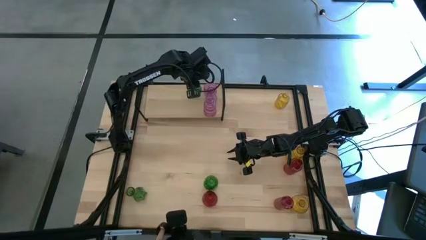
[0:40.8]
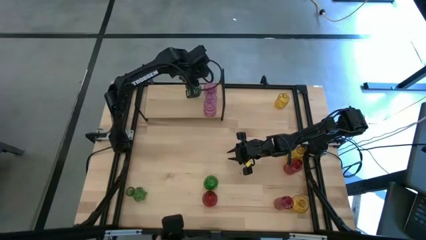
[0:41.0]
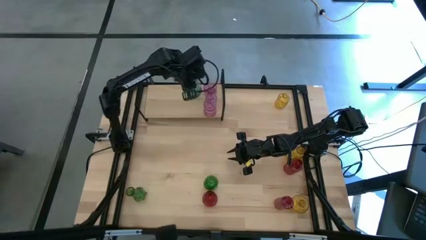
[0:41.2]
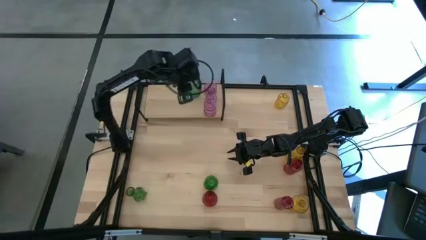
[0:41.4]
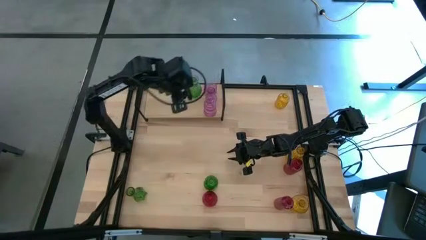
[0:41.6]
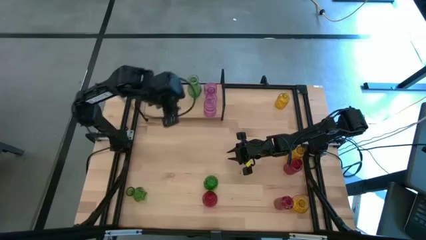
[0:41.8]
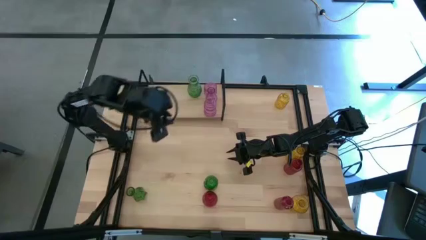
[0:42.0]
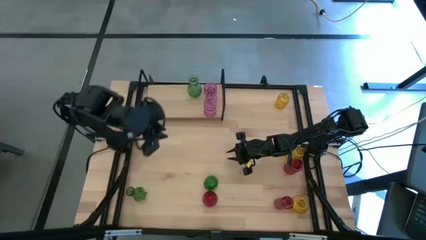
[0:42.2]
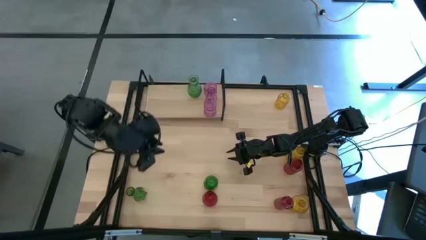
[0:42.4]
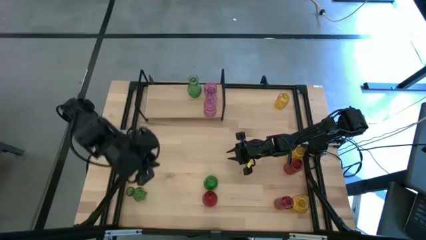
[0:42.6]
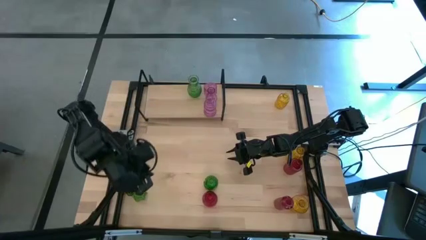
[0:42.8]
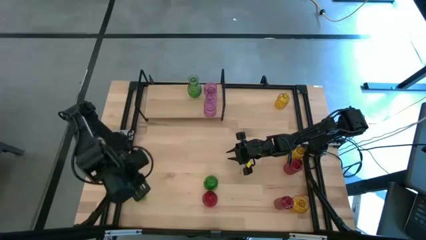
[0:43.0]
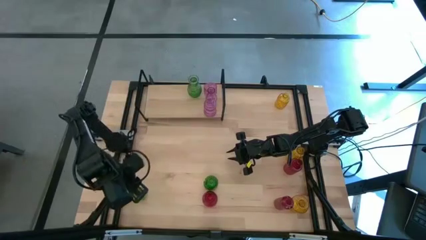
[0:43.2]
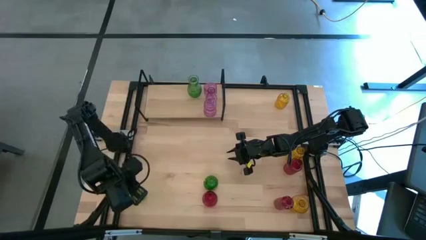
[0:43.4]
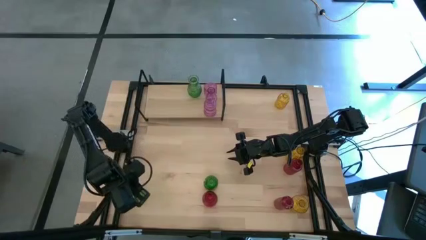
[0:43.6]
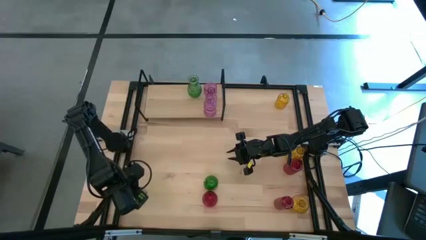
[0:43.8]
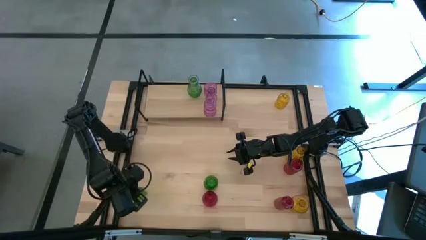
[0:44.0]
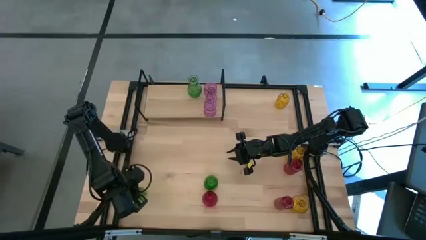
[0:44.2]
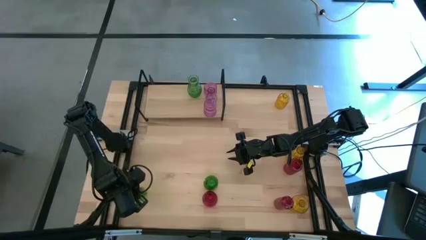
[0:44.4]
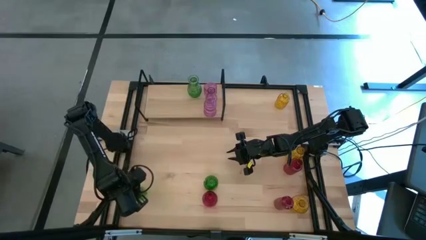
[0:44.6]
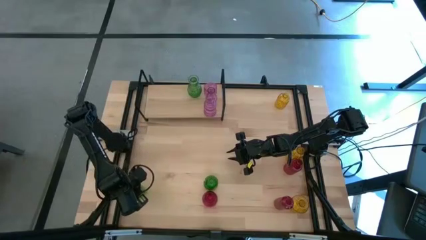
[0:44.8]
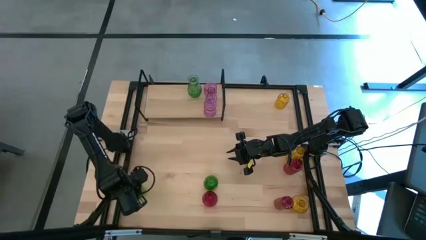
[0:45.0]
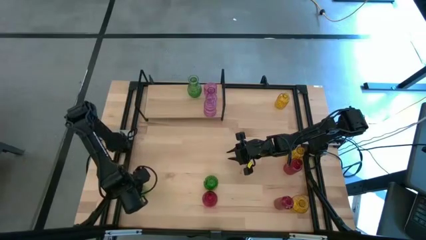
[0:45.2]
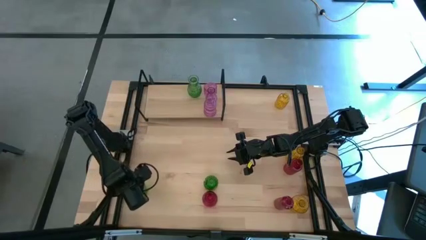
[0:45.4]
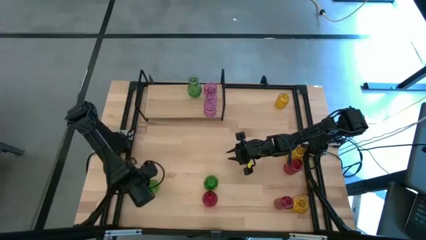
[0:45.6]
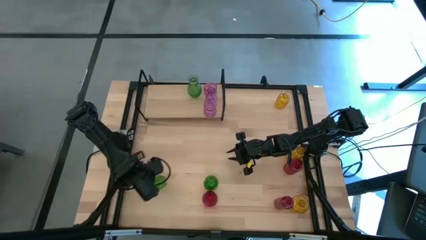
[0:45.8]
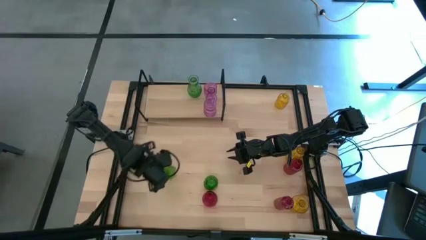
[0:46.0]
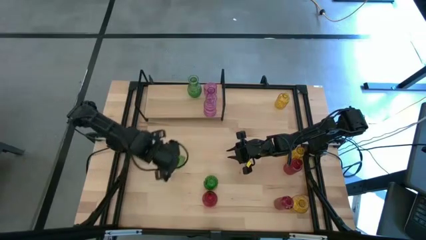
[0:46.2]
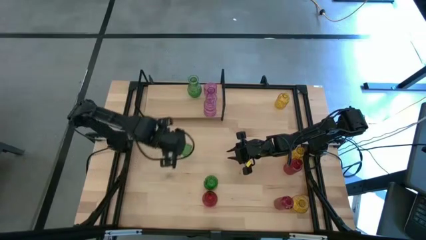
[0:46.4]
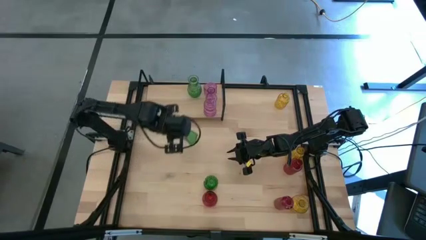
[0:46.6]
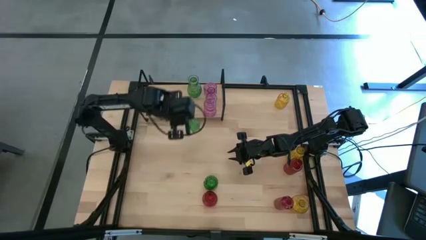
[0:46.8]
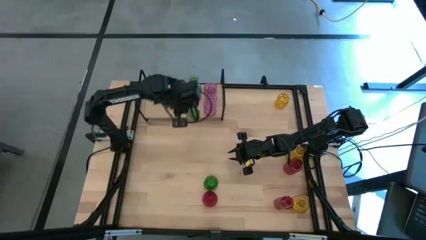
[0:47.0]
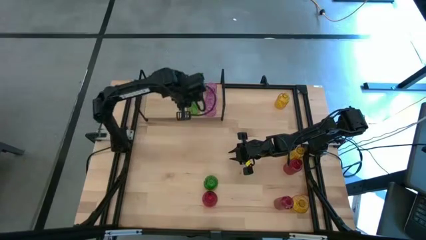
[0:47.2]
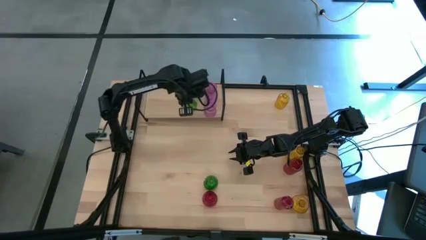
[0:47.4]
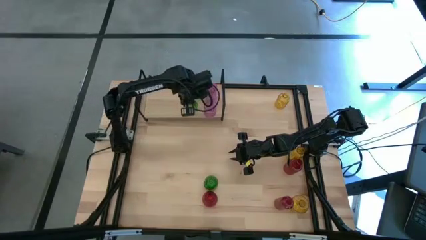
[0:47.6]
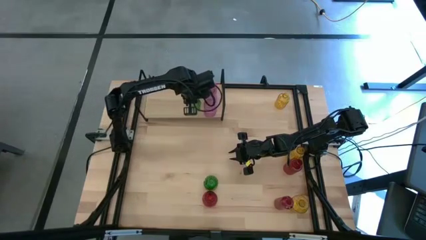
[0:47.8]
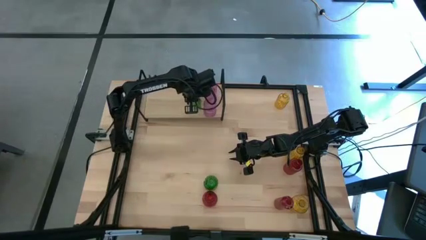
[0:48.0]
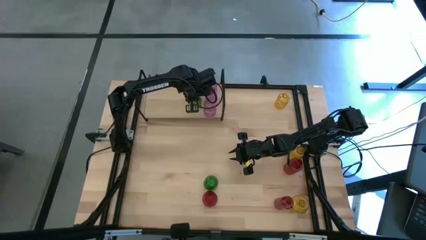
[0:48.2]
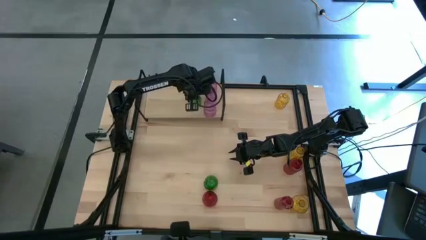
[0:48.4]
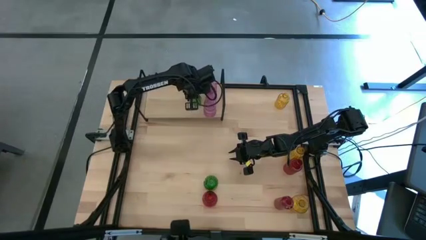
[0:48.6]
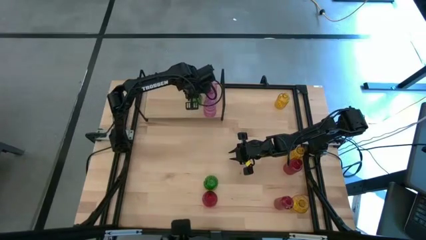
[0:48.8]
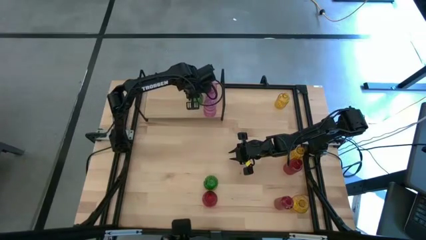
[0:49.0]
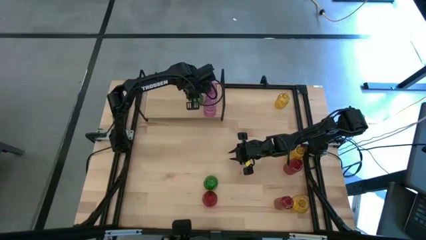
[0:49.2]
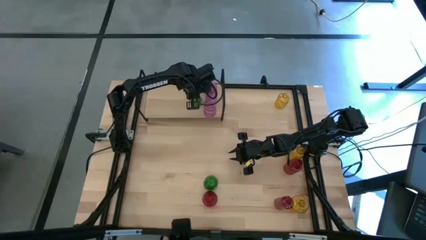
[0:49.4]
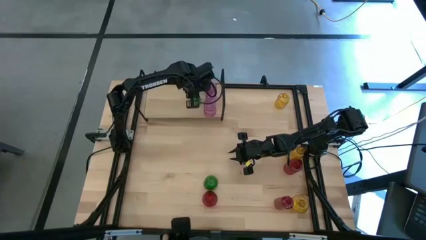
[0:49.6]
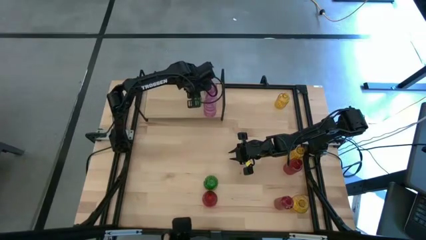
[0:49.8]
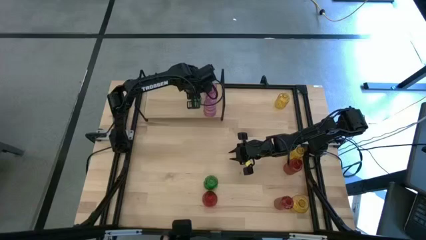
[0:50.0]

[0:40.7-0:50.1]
Task: sort vases onto shelf
Put the left green vase on the shelf aligned with the other green vase

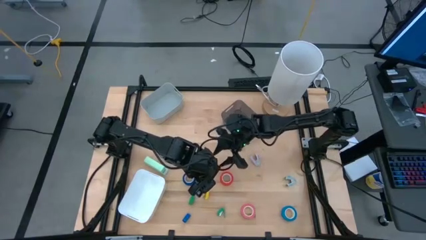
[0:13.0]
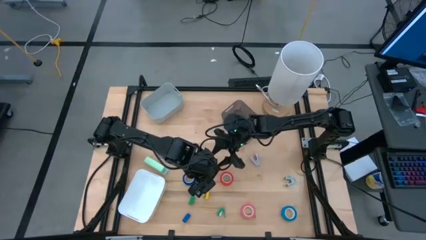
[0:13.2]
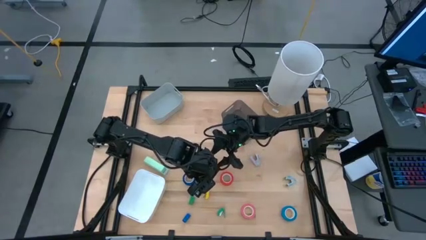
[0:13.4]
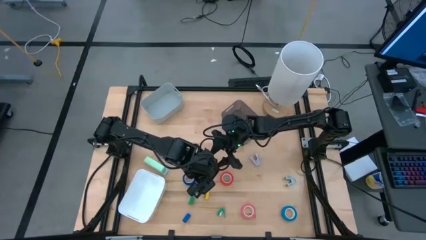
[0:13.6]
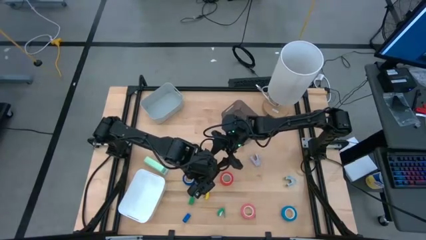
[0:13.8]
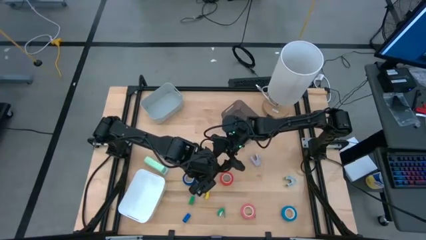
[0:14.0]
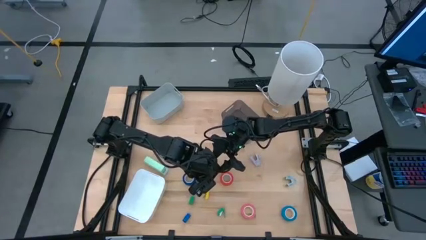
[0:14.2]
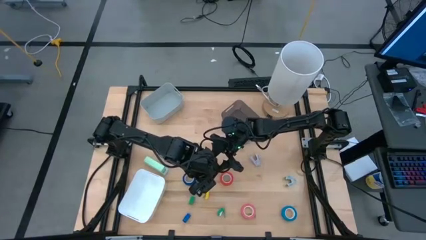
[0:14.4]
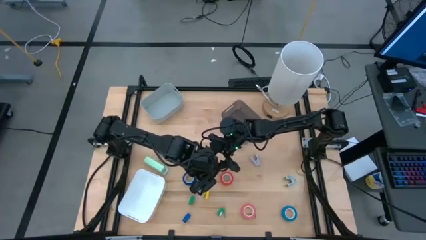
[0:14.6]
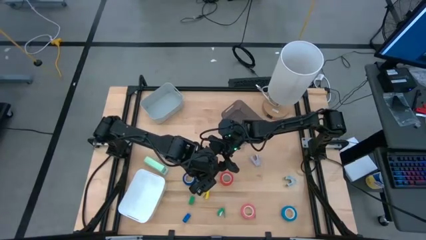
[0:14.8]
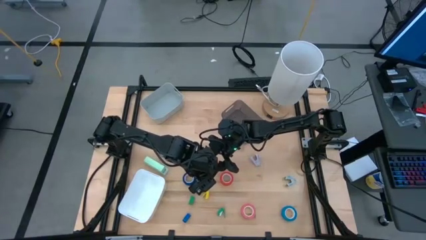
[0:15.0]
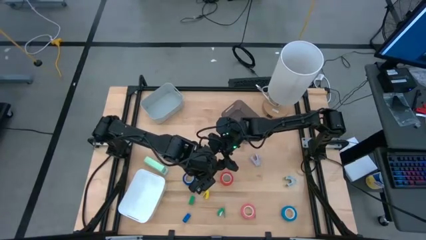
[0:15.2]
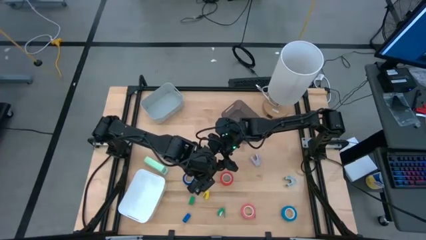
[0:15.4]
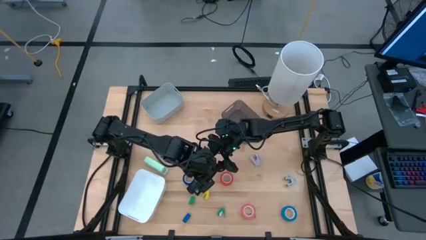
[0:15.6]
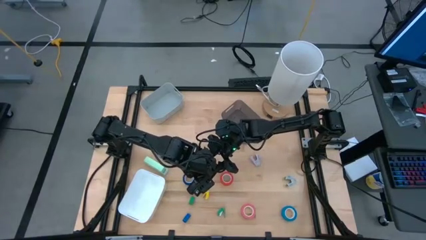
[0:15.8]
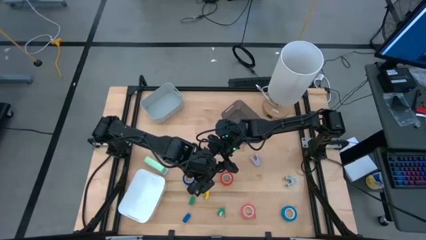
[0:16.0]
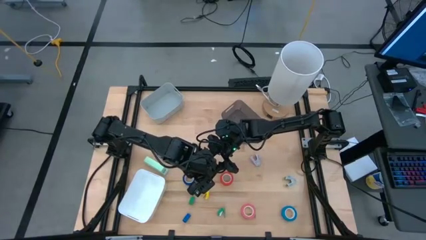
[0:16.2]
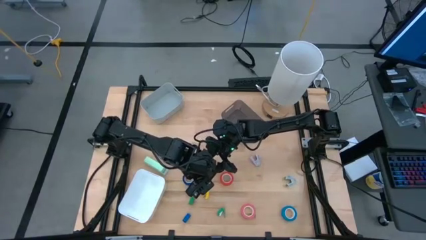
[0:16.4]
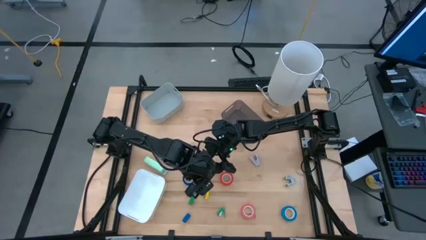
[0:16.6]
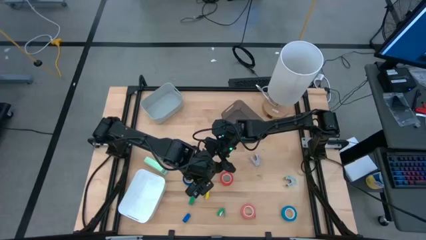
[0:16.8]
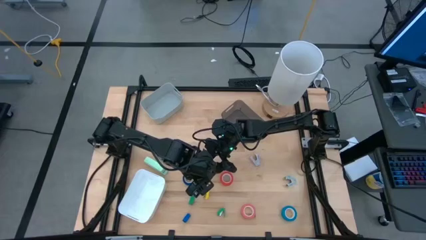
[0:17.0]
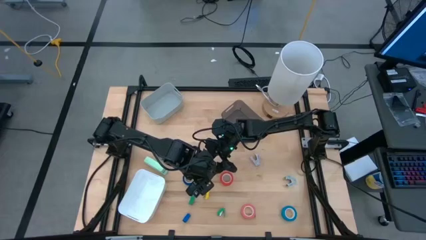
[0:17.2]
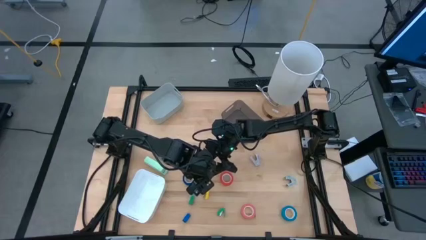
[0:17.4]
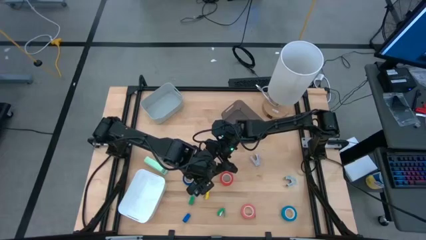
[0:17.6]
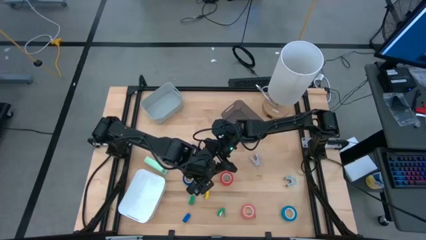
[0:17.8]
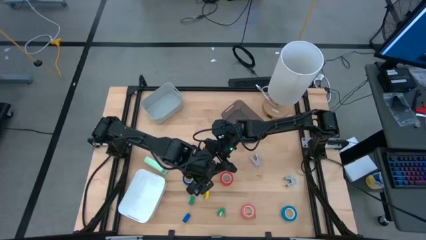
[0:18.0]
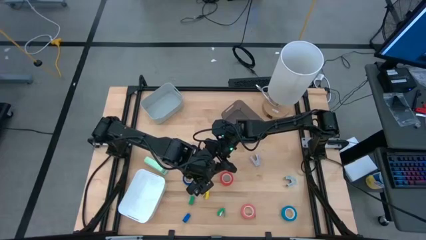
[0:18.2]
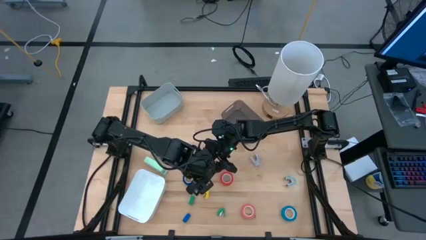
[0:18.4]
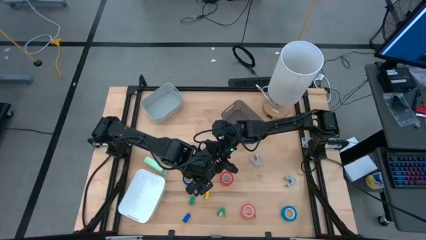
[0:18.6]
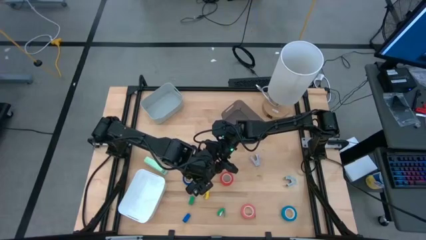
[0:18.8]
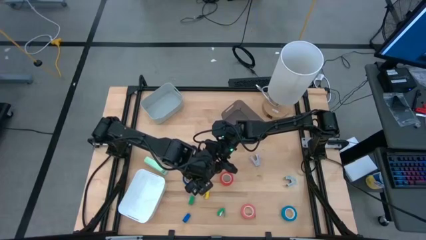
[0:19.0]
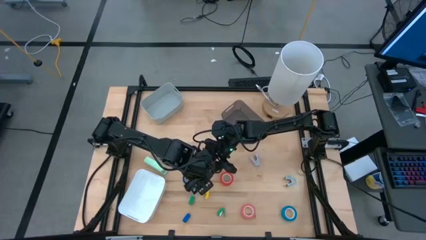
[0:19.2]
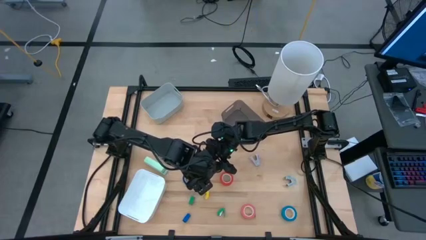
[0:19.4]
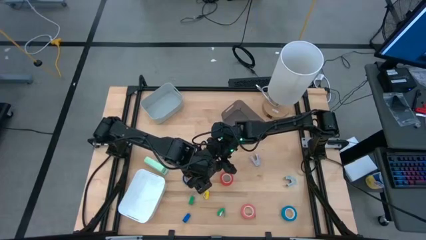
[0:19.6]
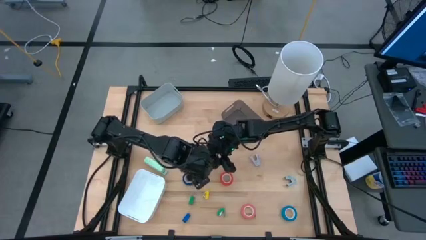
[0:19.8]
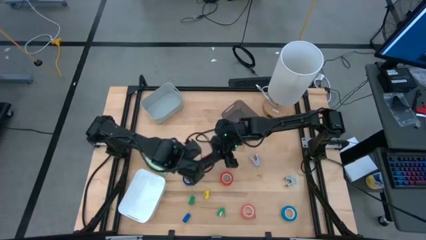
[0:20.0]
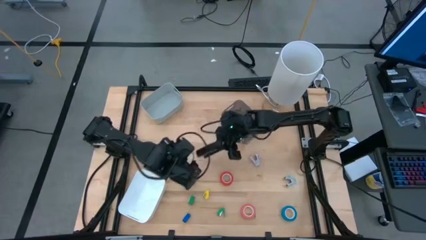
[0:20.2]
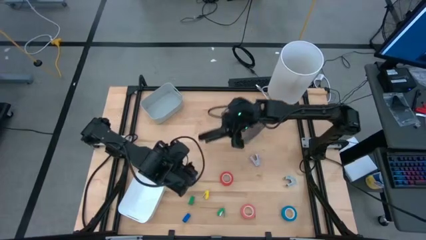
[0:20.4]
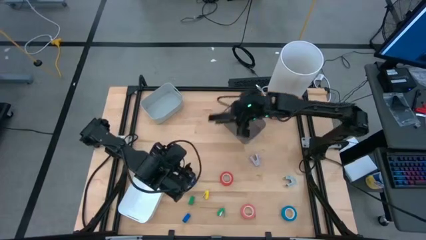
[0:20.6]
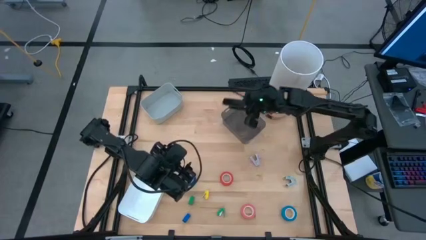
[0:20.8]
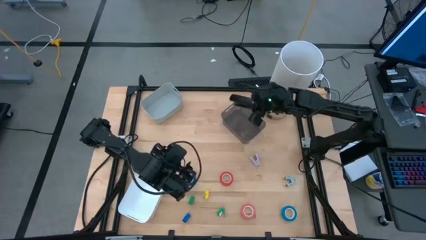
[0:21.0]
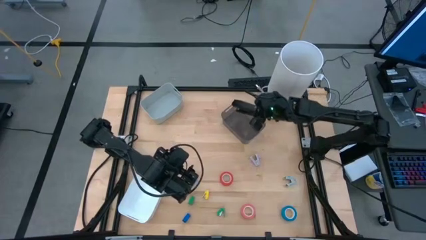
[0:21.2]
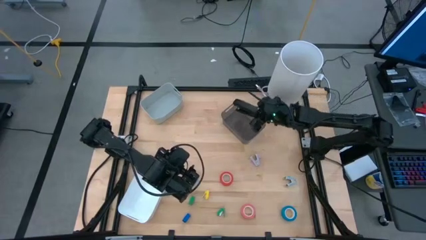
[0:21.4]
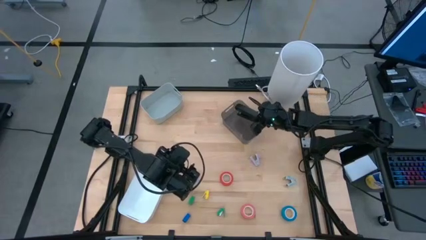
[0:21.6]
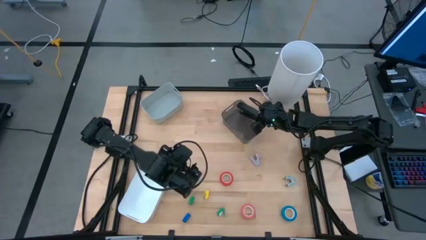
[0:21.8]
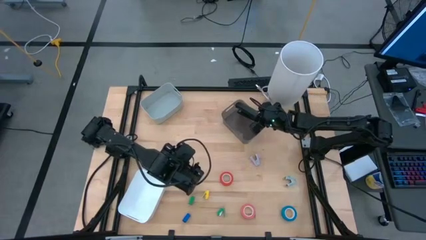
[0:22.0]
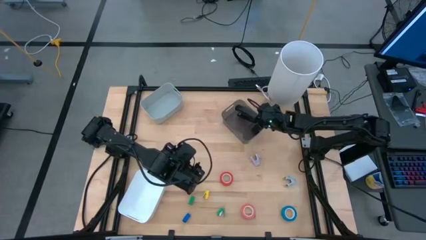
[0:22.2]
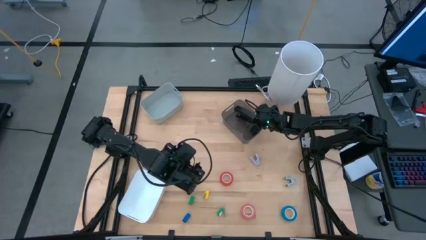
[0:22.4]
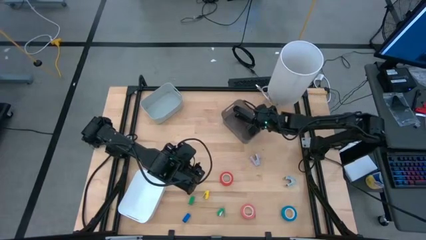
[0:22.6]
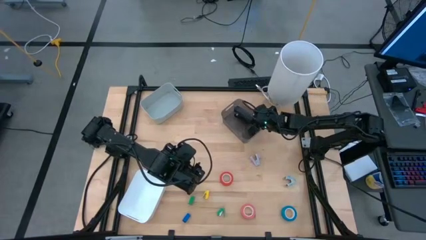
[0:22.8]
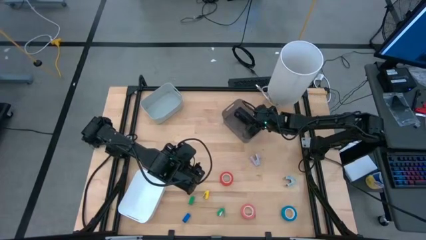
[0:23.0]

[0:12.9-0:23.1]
Task: Pick and place Stapler, Stapler remover, tape
Put the large black stapler into the black bin
